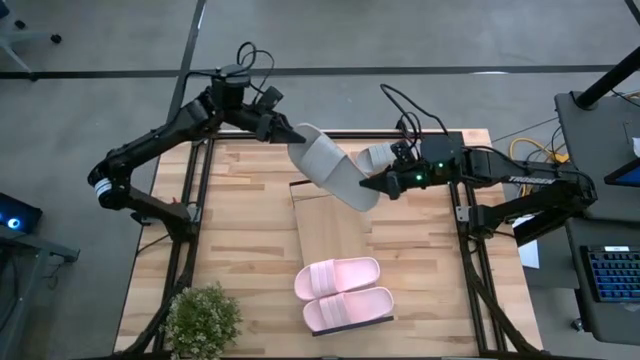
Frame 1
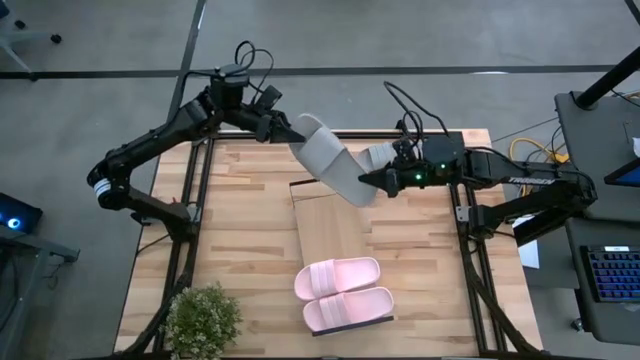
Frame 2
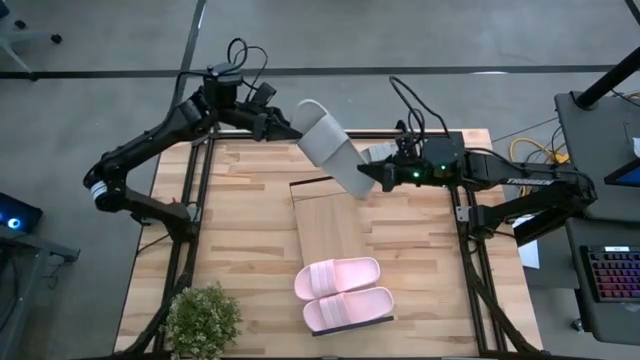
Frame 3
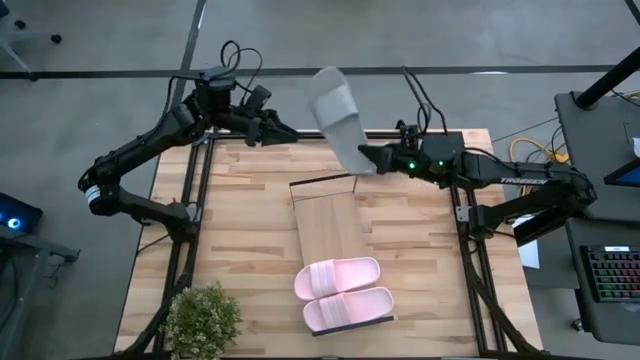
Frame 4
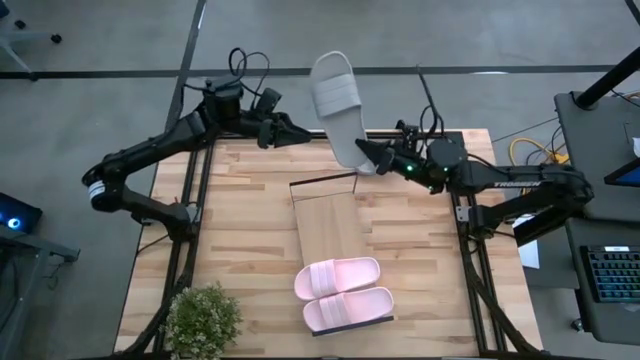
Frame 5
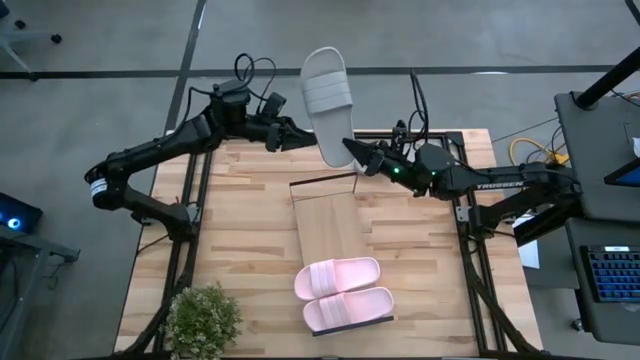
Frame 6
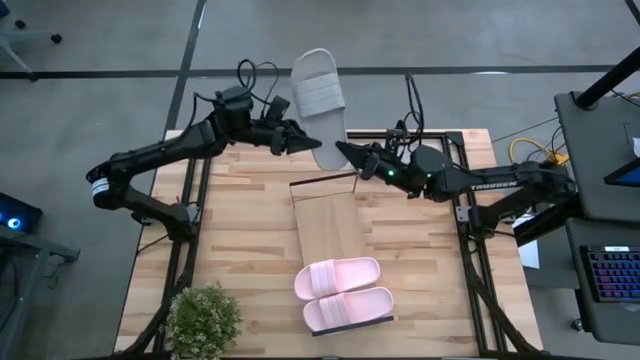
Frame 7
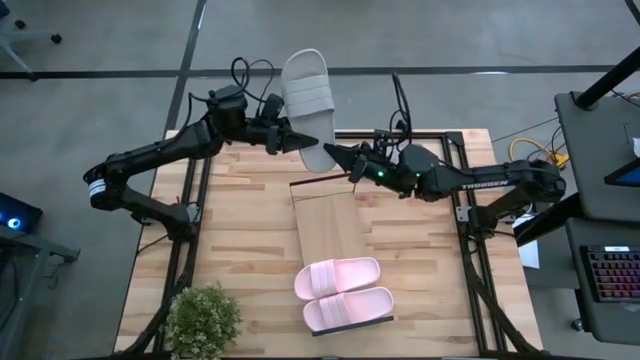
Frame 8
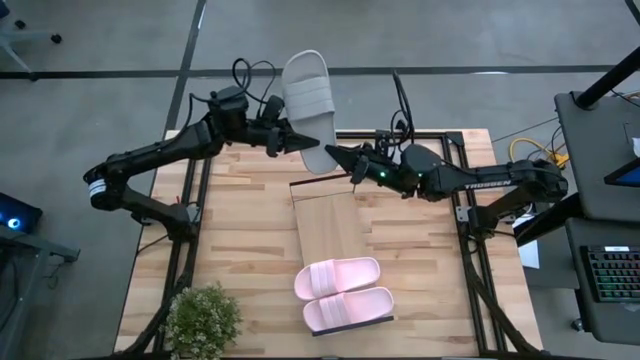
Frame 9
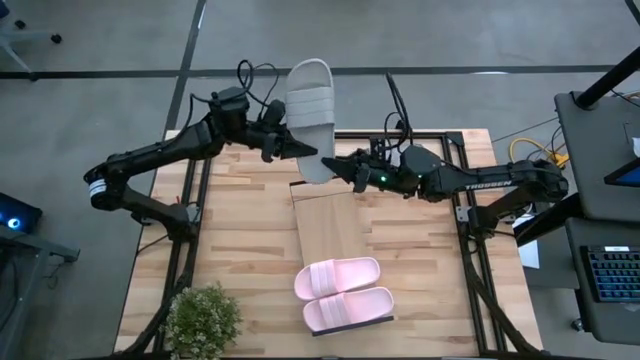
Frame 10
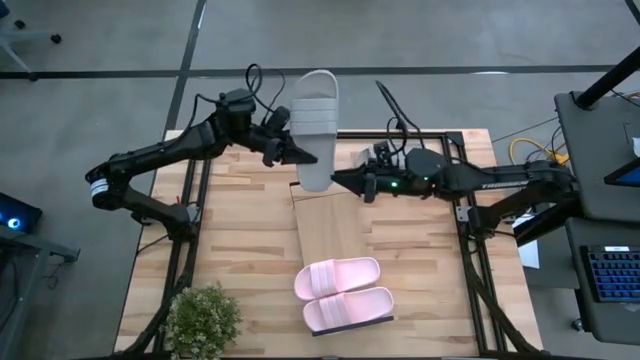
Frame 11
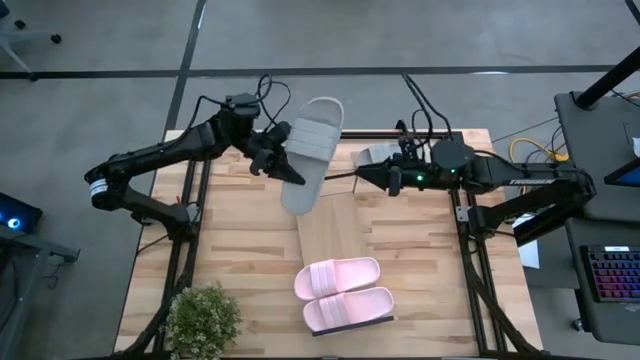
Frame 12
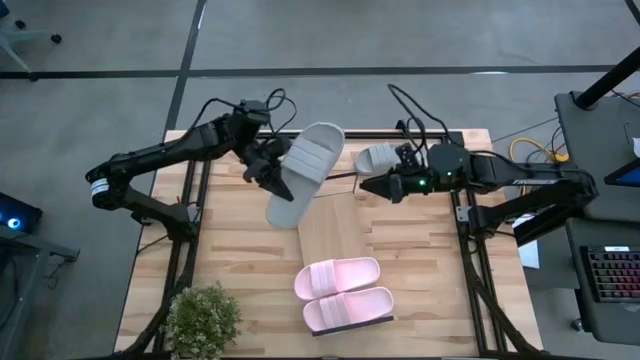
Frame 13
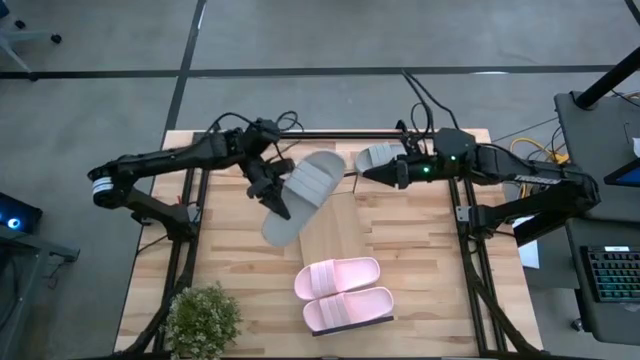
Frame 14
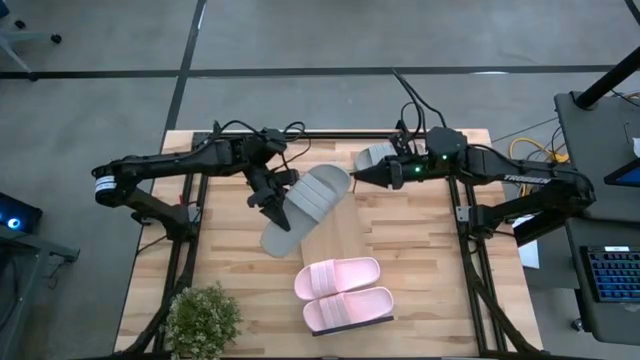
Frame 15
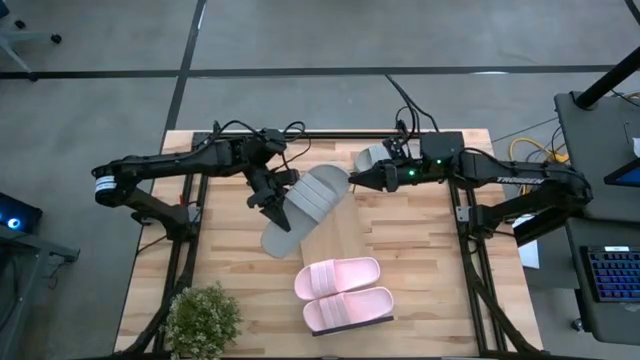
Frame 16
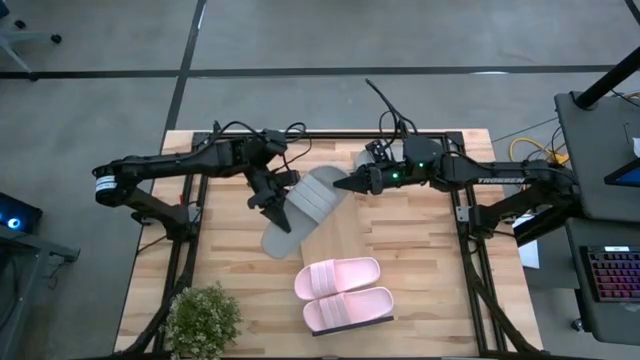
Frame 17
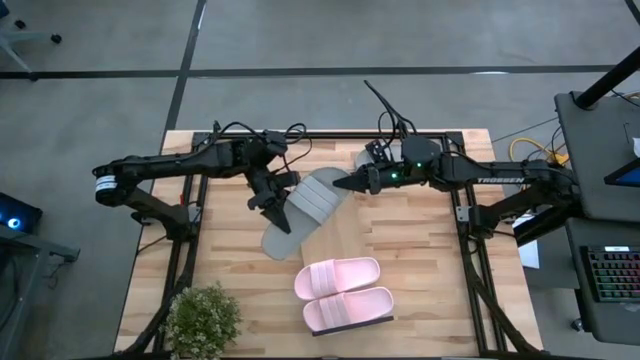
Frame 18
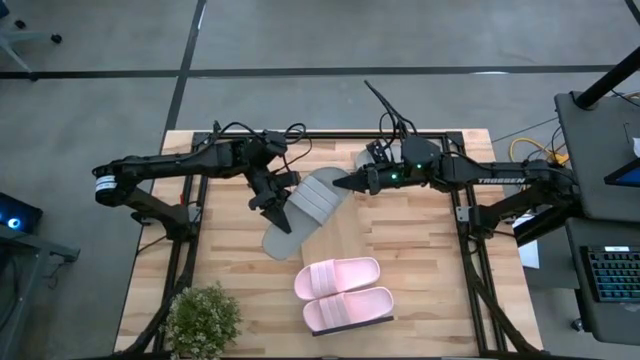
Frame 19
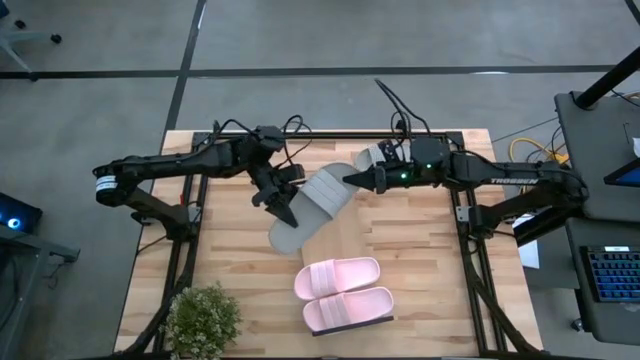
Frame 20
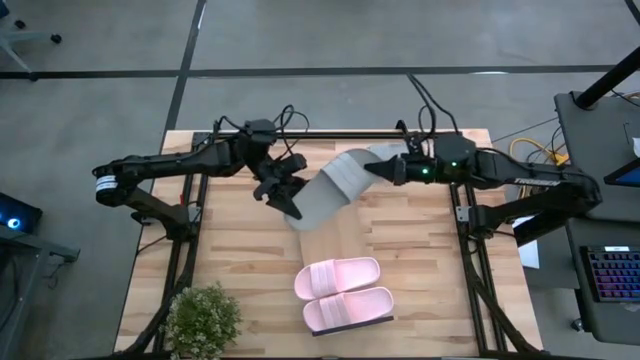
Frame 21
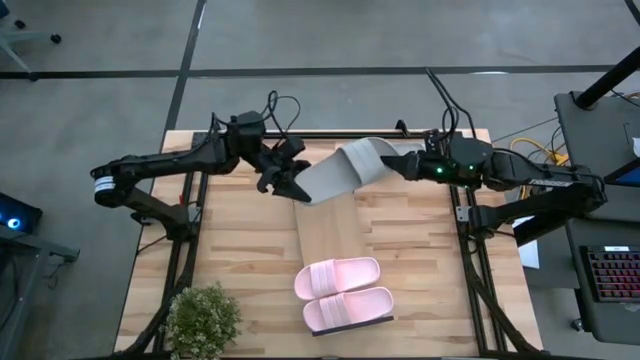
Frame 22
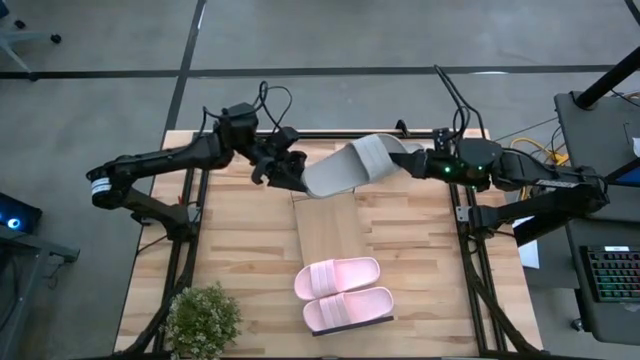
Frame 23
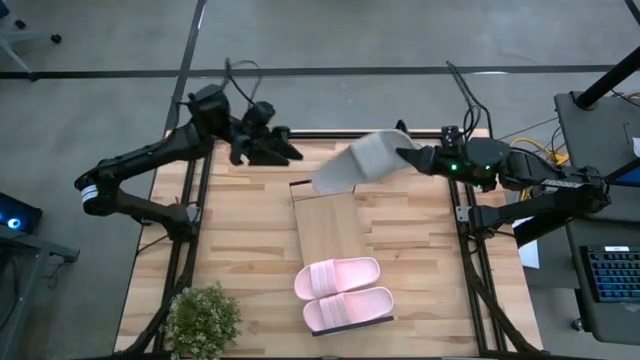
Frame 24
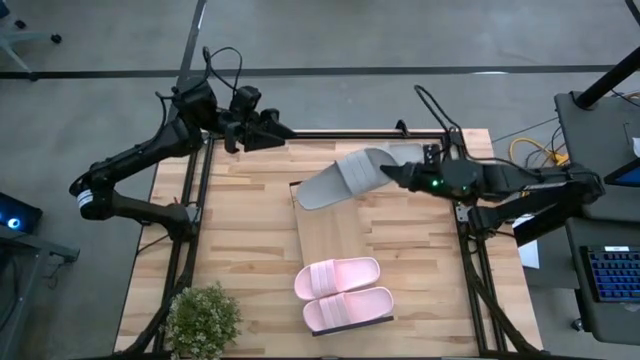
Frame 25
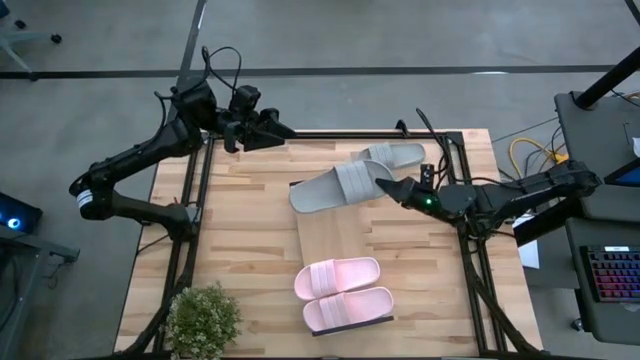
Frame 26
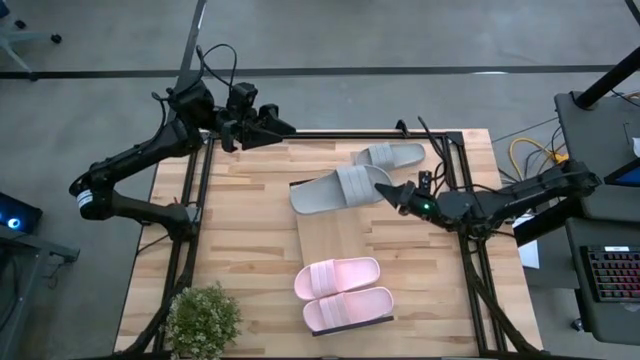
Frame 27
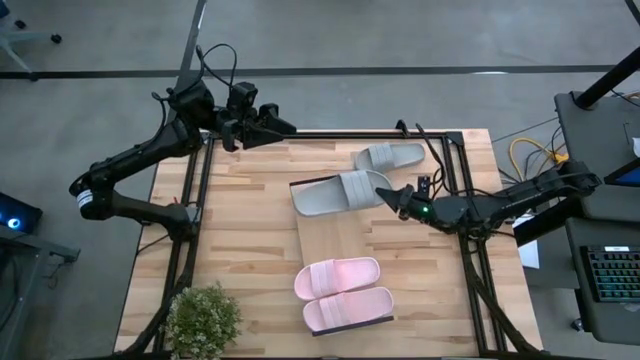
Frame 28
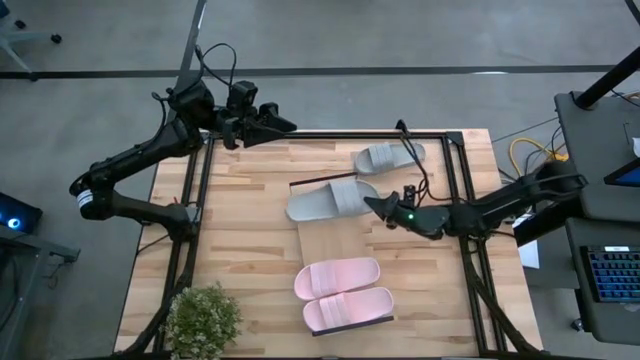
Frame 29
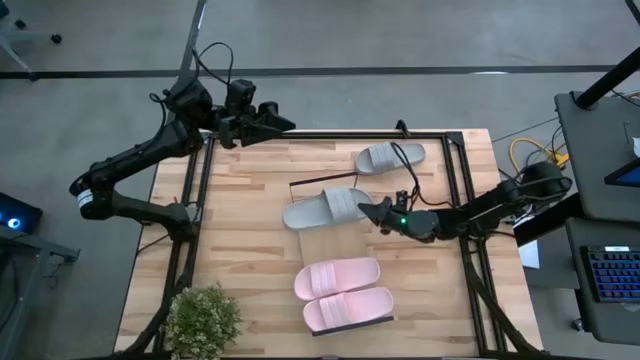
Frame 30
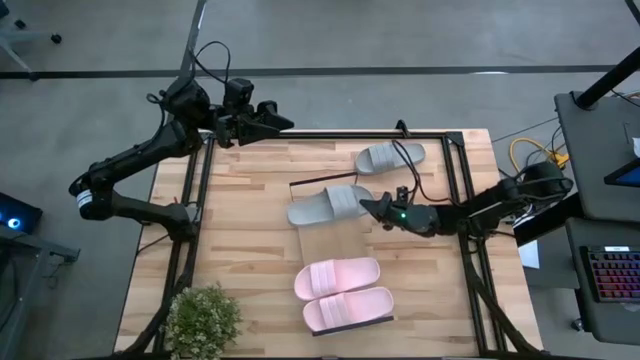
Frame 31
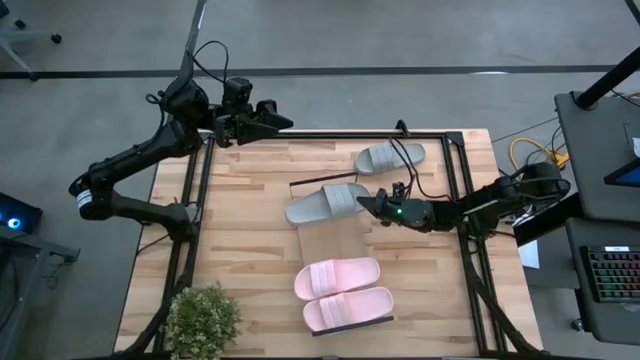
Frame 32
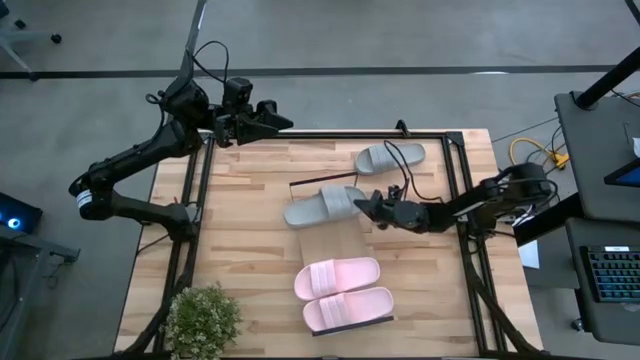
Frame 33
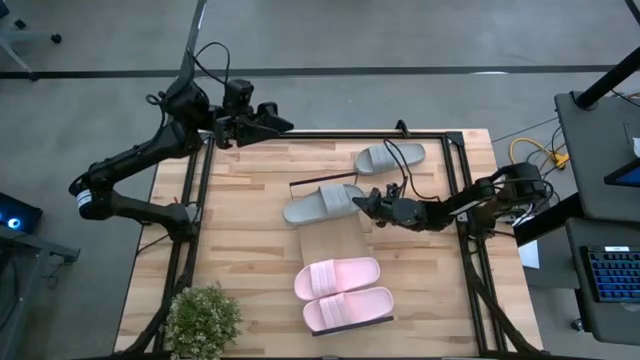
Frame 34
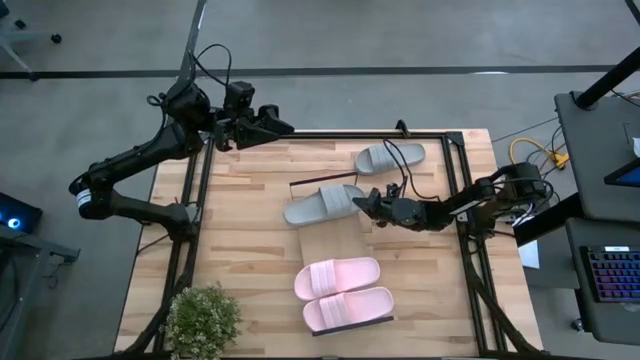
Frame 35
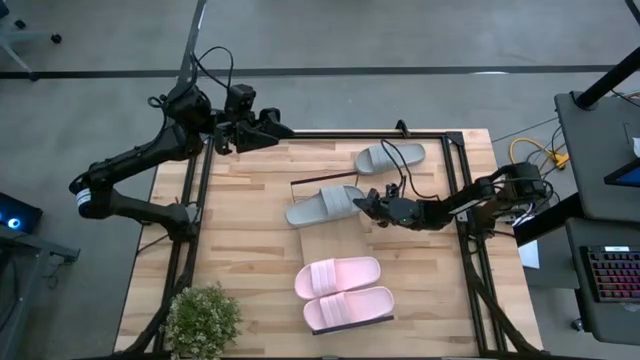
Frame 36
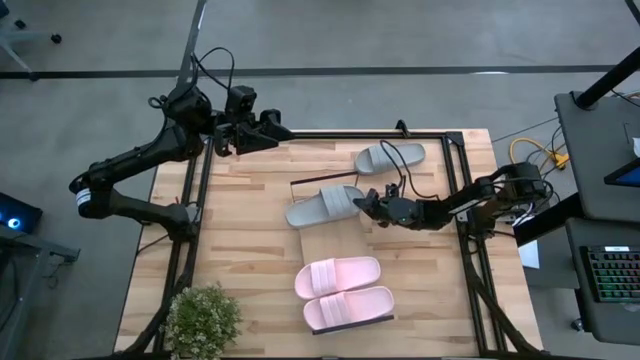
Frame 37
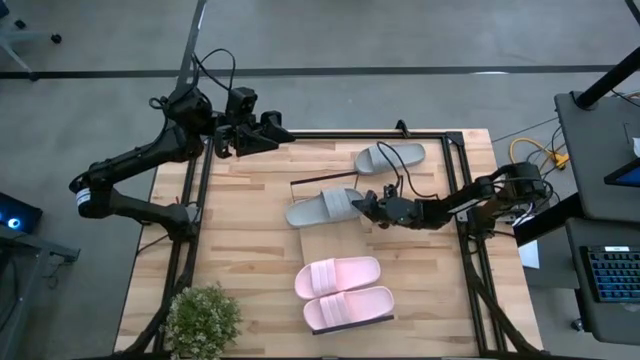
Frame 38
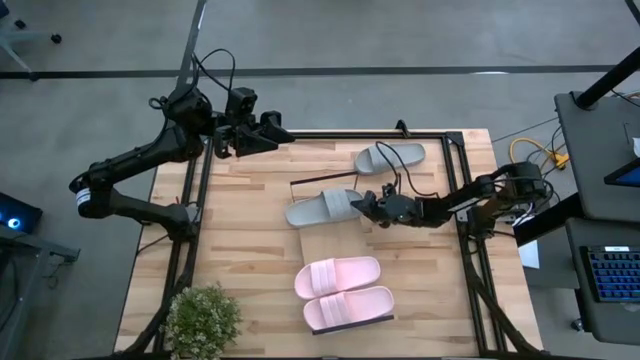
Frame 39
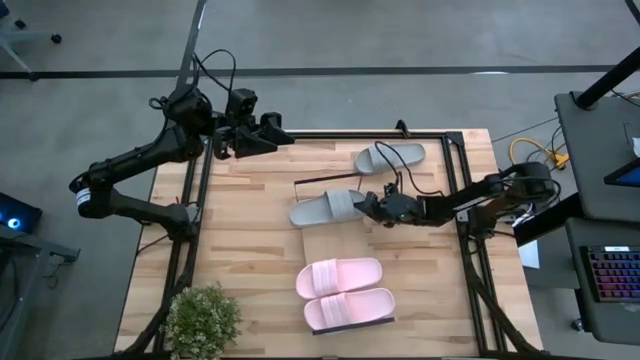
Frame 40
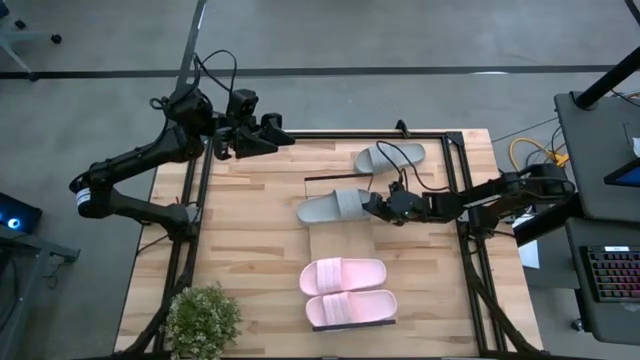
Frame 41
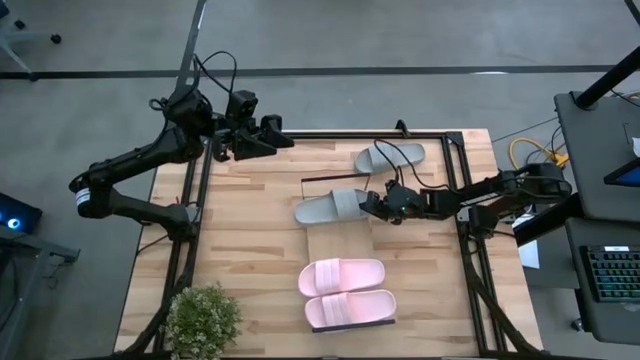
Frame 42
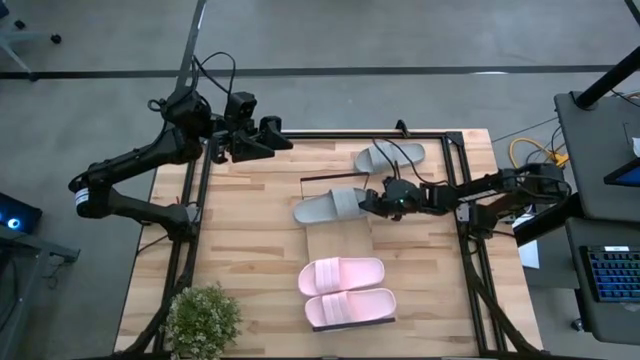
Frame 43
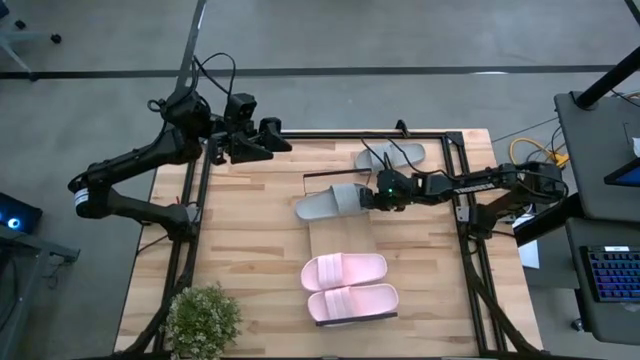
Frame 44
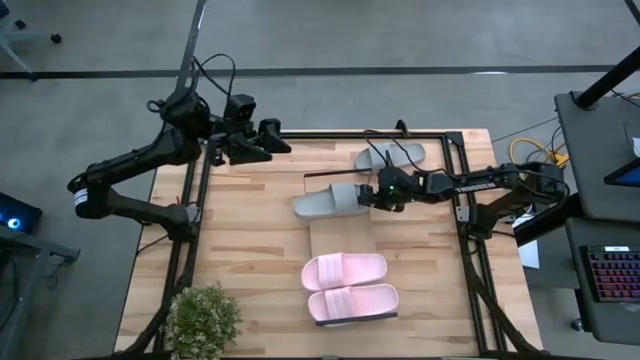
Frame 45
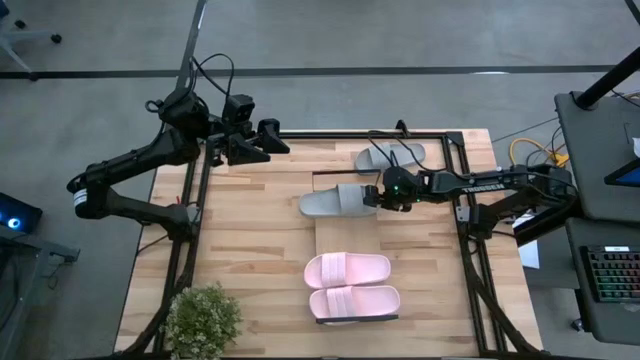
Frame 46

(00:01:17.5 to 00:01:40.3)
Task: Pick and place slides into the shelf
Put the bottom gray slide on the shelf
